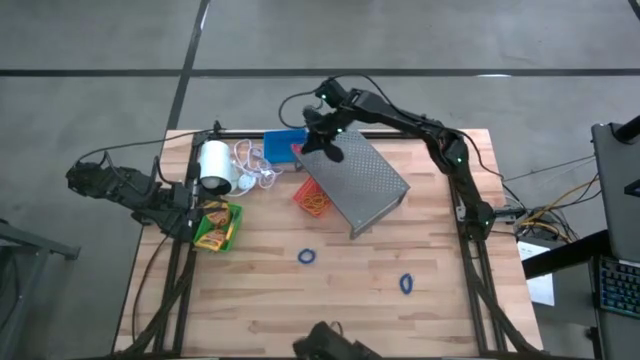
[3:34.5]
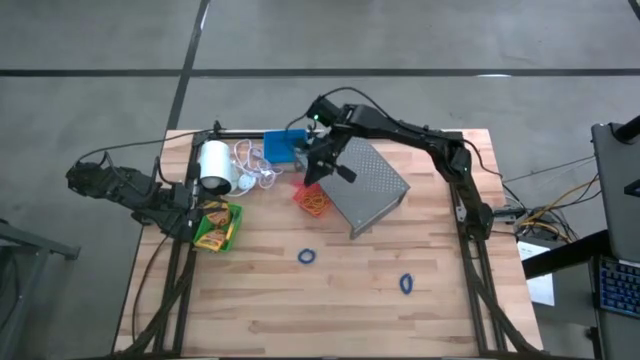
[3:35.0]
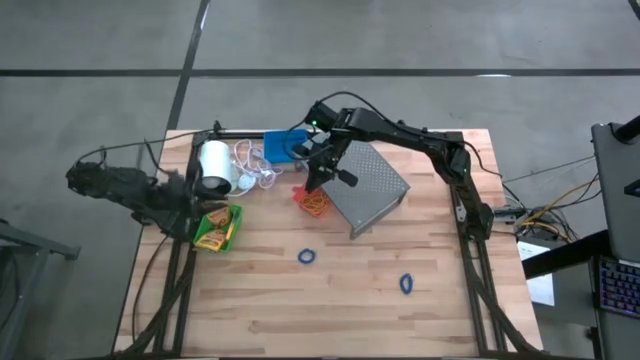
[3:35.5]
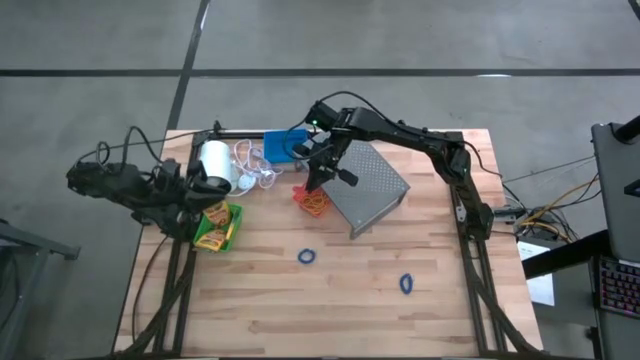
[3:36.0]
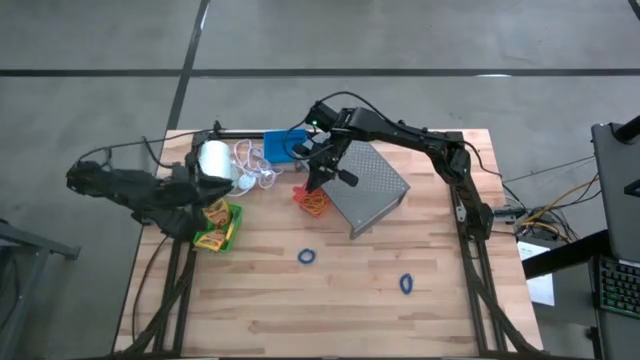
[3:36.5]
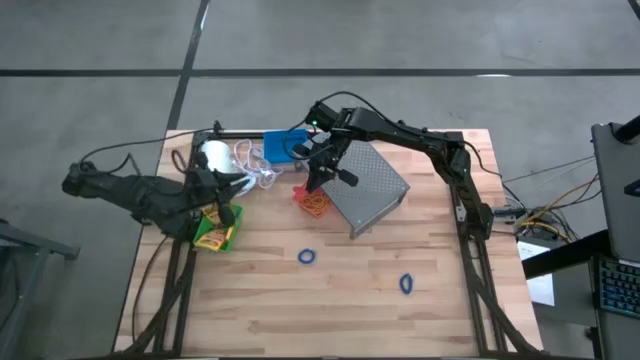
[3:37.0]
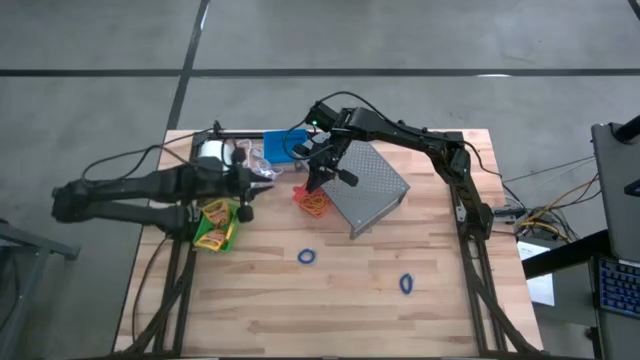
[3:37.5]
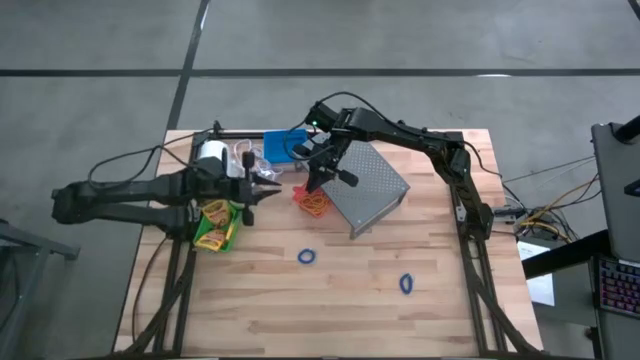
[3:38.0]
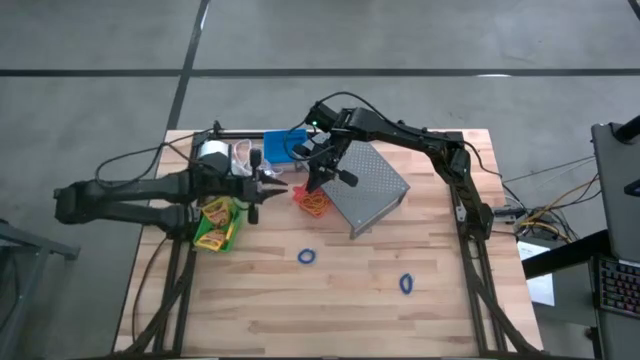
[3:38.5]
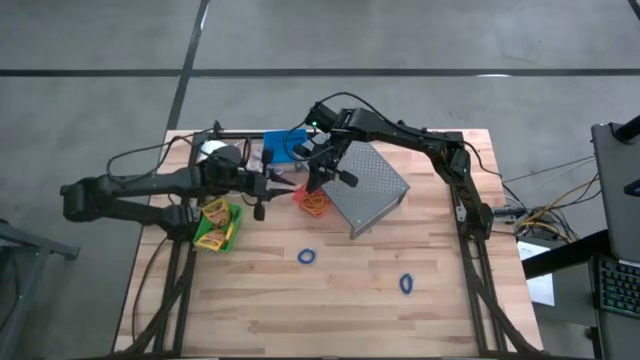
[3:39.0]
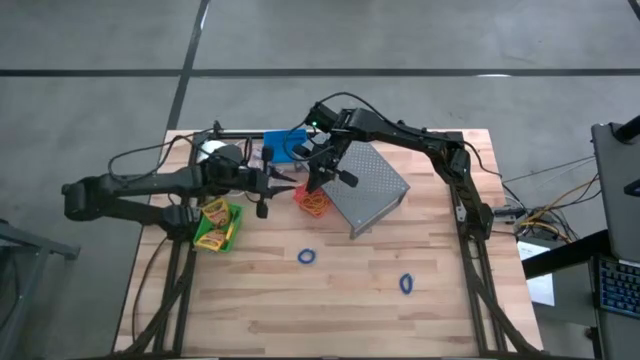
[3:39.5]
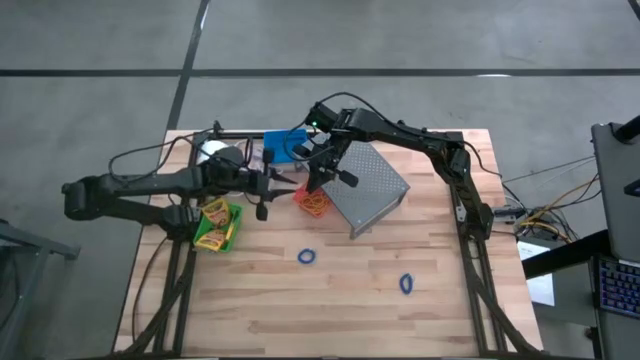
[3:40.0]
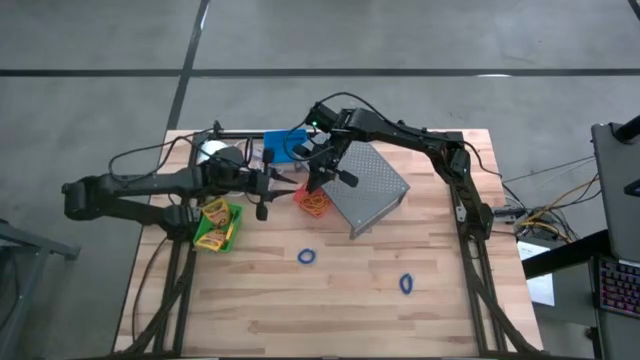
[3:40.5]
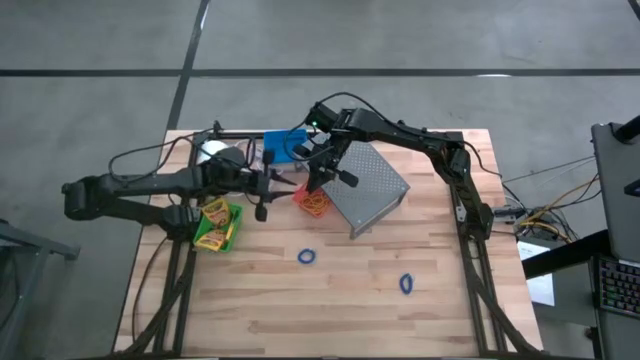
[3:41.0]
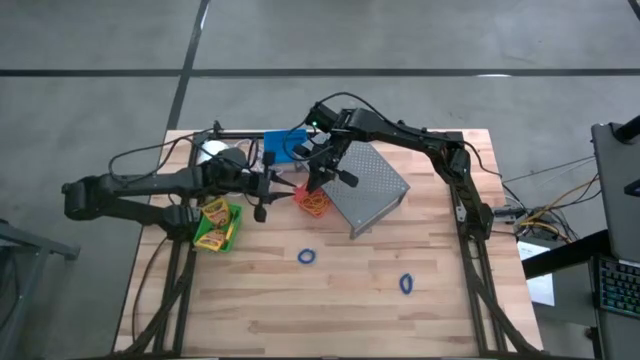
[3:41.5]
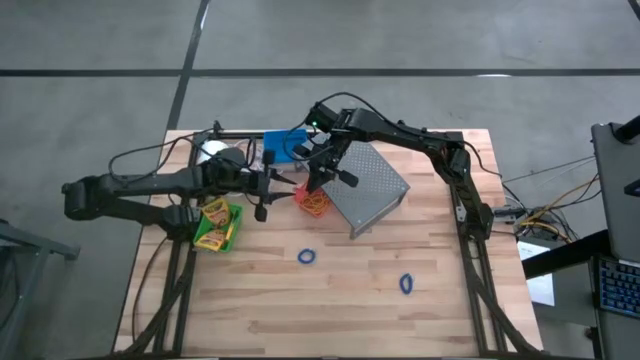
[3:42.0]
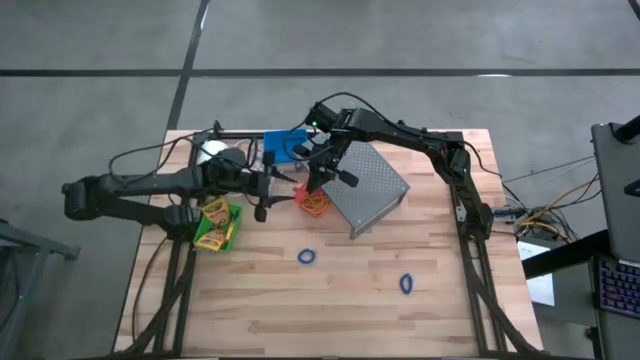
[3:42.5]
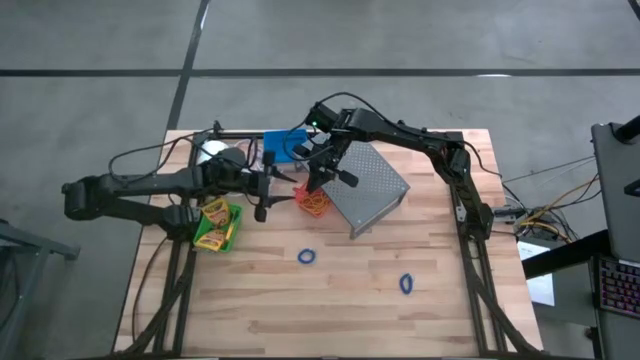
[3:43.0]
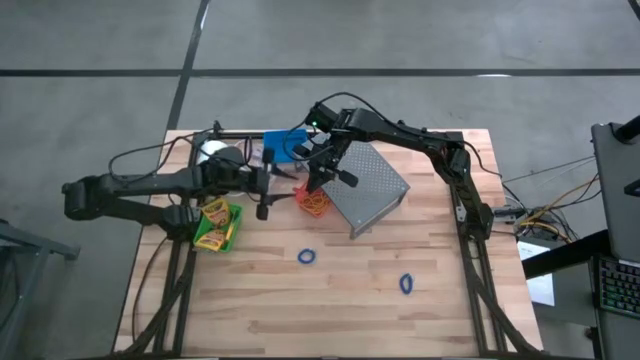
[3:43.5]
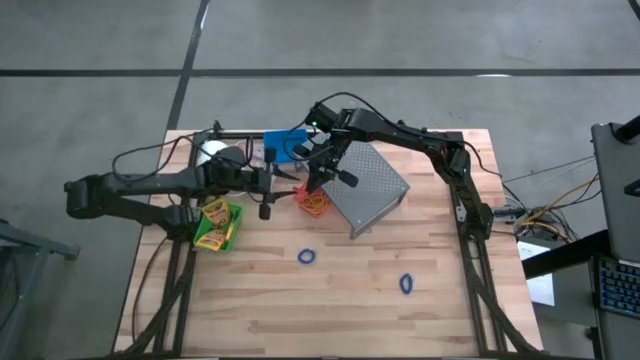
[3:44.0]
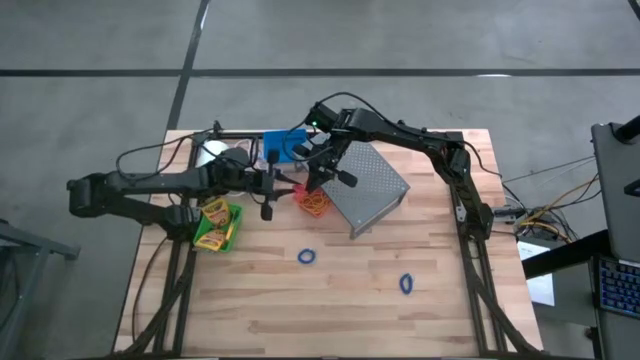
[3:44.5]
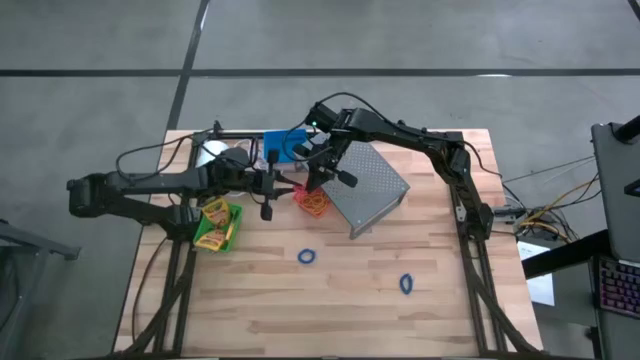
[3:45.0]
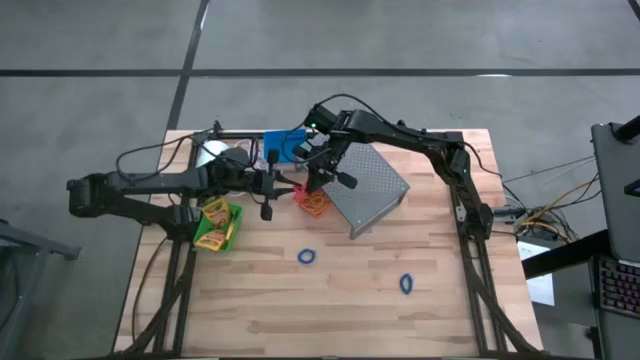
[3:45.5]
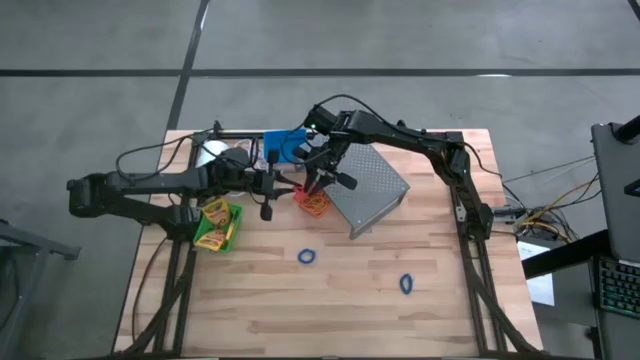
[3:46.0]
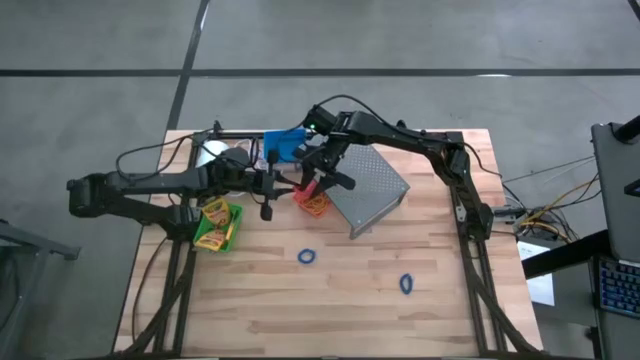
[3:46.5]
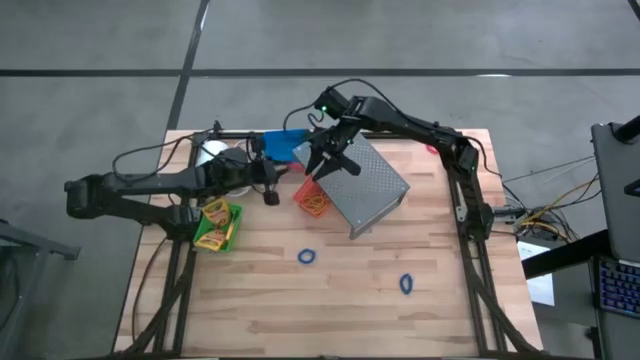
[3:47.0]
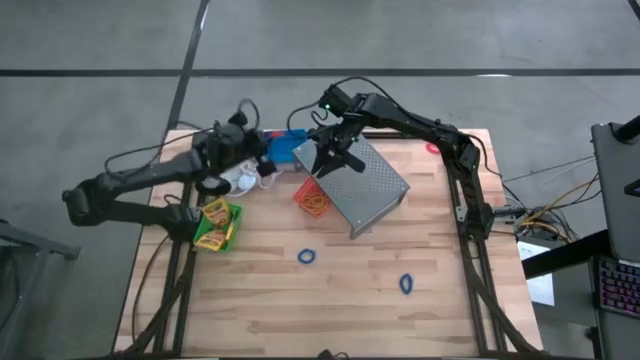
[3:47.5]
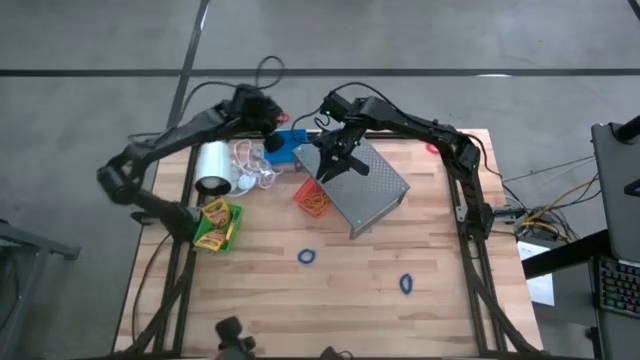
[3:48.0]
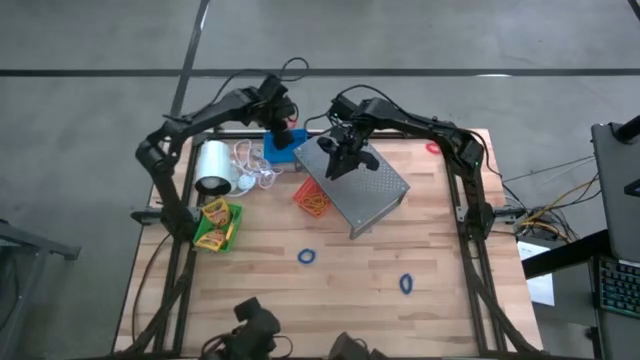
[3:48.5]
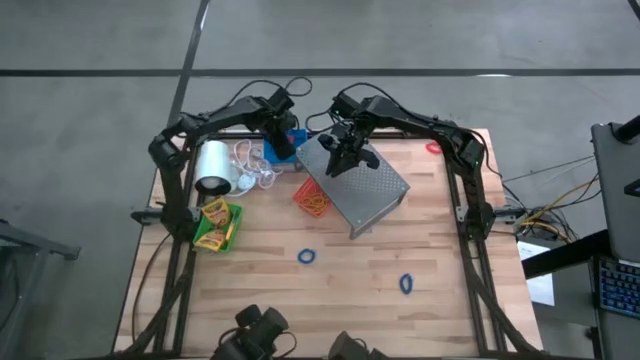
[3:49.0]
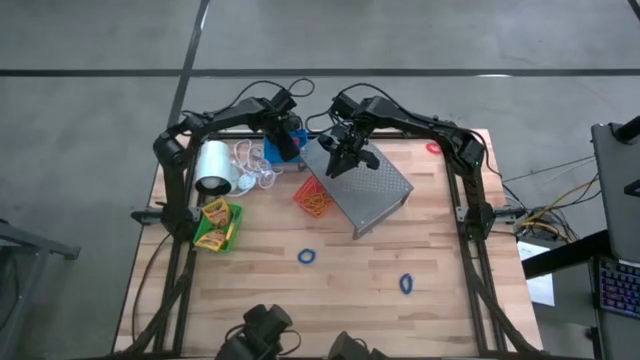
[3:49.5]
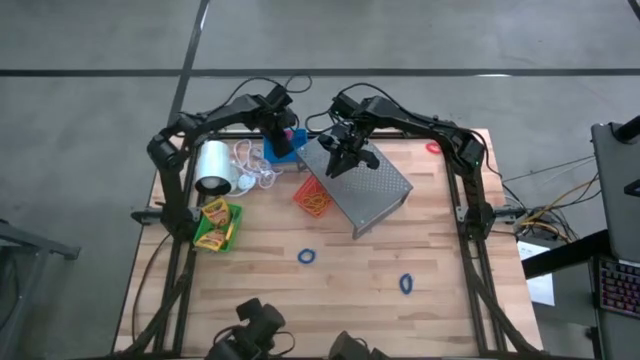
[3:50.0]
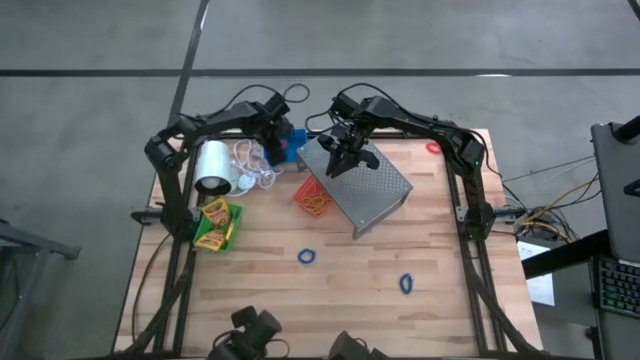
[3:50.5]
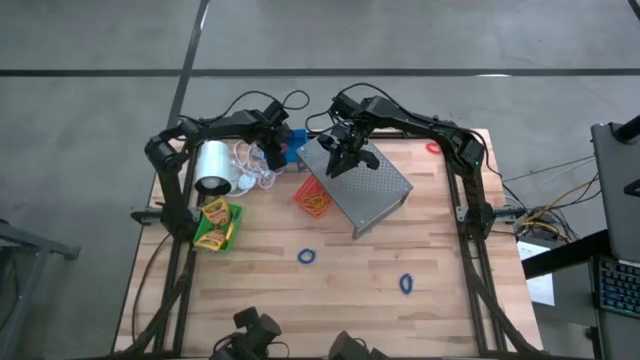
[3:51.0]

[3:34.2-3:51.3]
Task: Pick & Place Office Desk Supplies
Put the orange spring rubber band into the blue bin

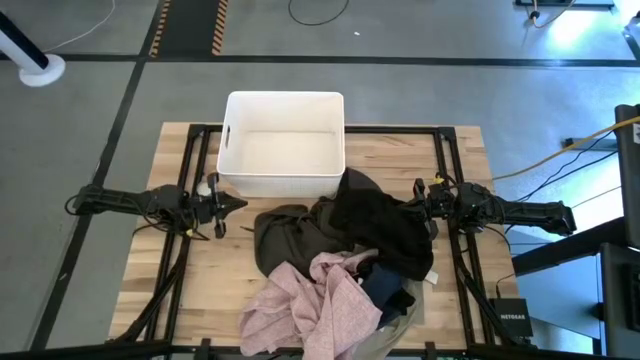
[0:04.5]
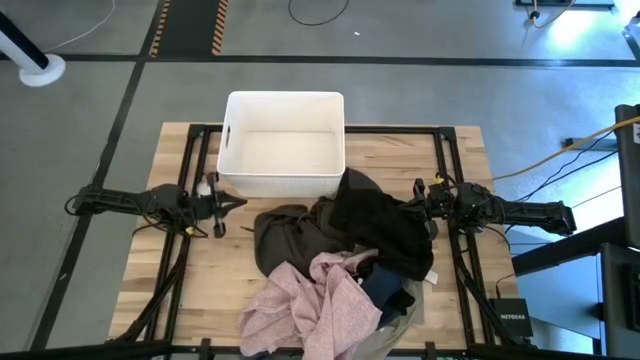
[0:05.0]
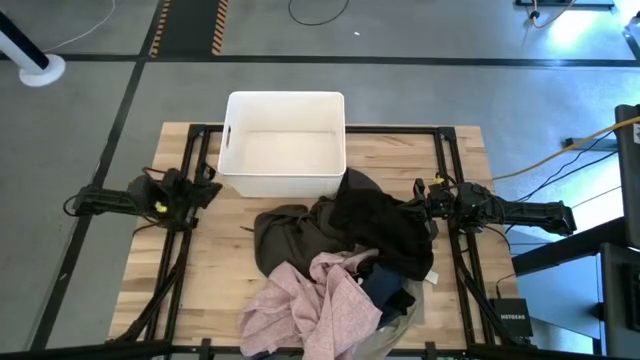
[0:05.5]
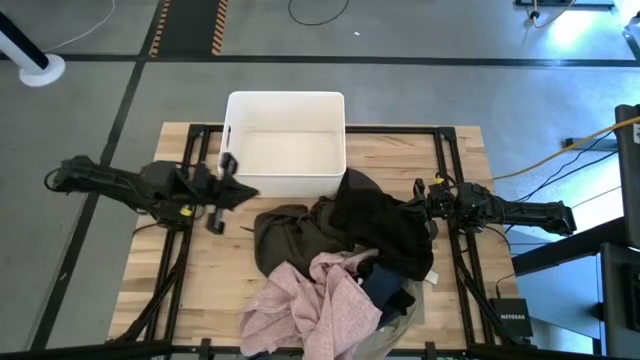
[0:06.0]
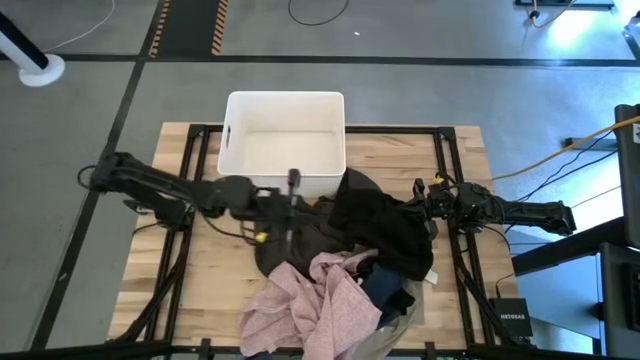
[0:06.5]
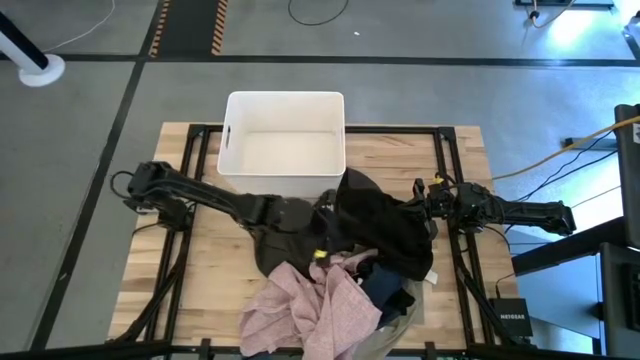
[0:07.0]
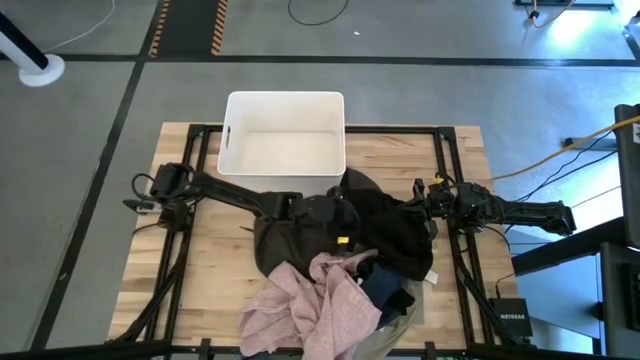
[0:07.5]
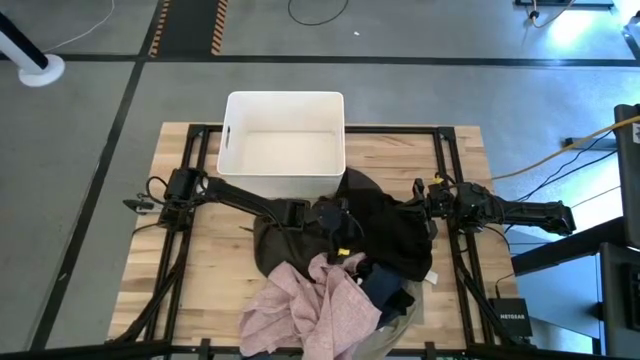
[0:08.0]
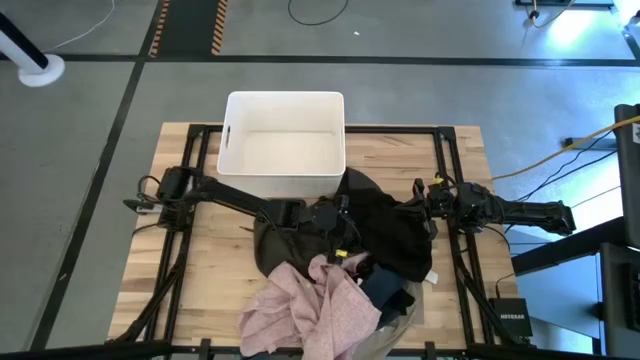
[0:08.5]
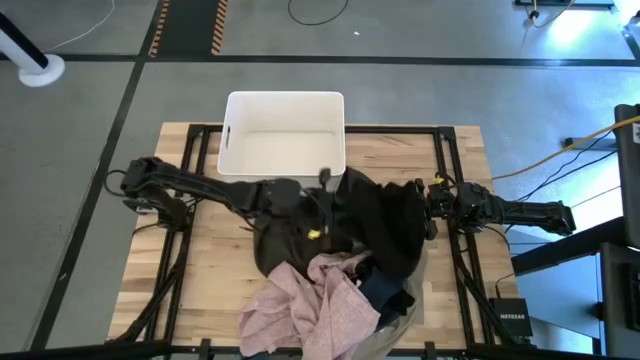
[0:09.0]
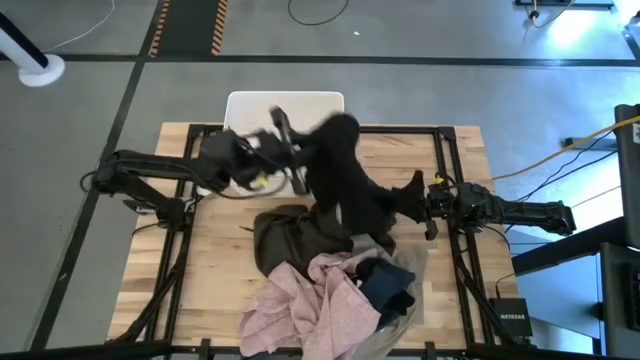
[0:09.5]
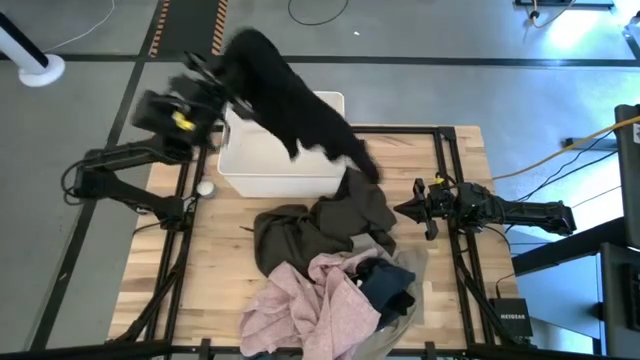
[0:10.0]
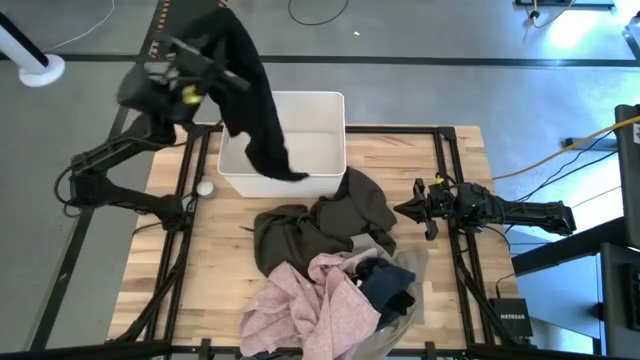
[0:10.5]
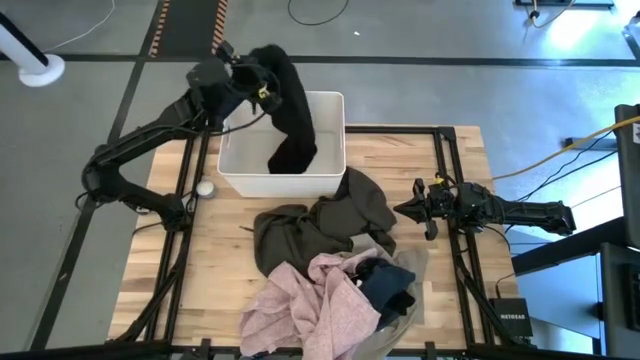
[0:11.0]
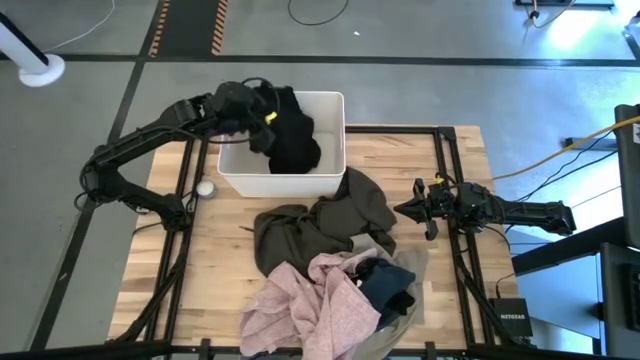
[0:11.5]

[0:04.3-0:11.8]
Task: Sort clothes
Put the black shirt into the white laundry bin
